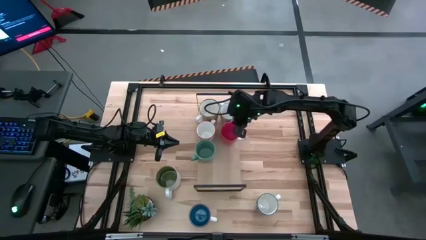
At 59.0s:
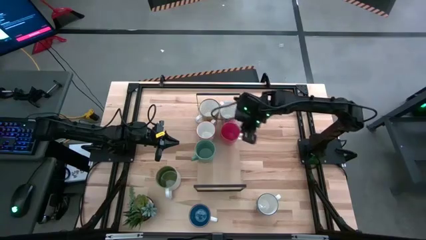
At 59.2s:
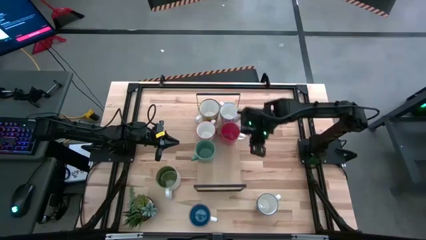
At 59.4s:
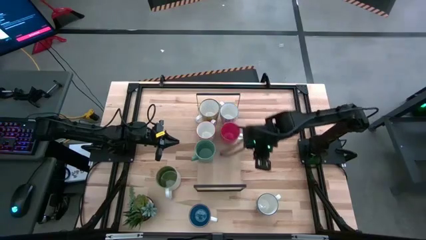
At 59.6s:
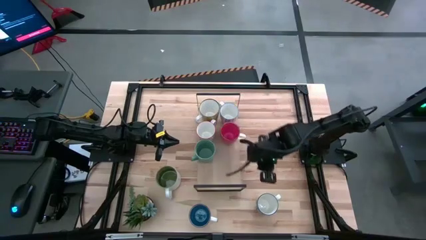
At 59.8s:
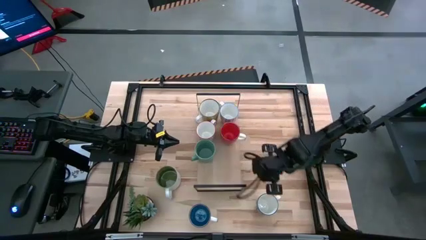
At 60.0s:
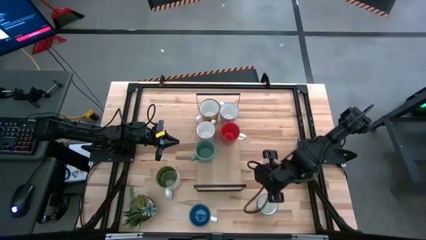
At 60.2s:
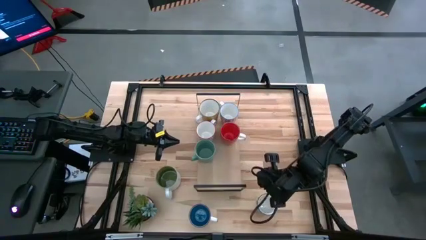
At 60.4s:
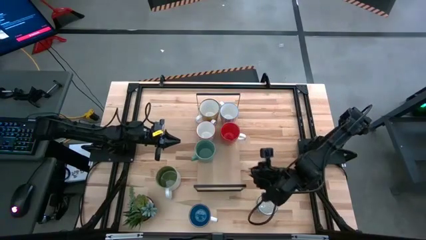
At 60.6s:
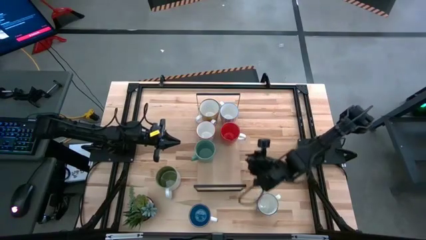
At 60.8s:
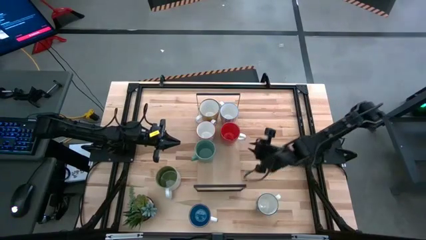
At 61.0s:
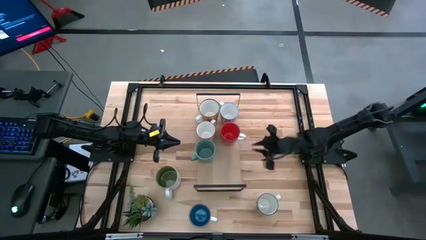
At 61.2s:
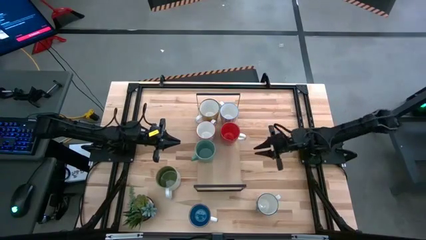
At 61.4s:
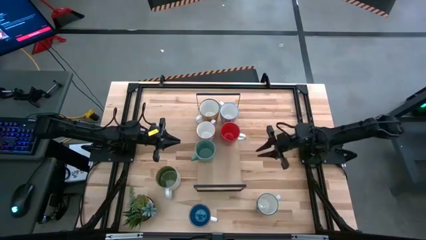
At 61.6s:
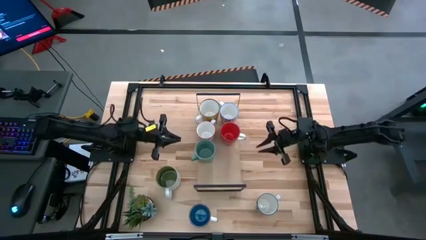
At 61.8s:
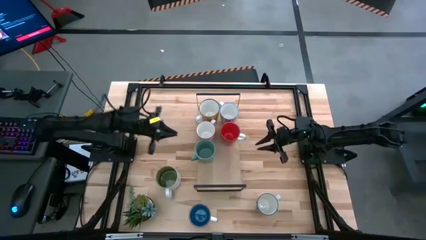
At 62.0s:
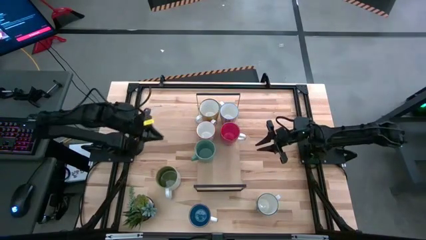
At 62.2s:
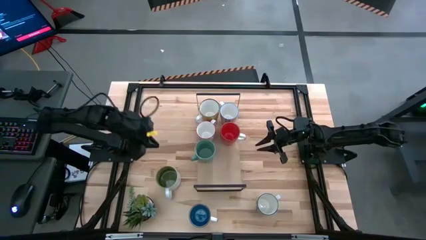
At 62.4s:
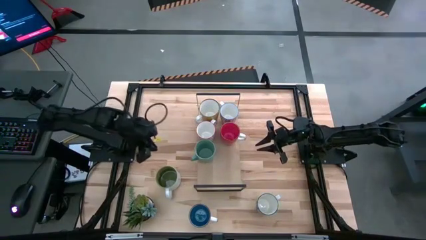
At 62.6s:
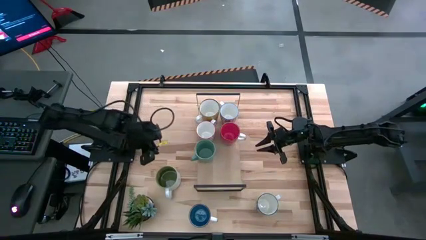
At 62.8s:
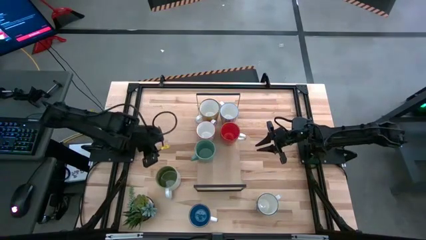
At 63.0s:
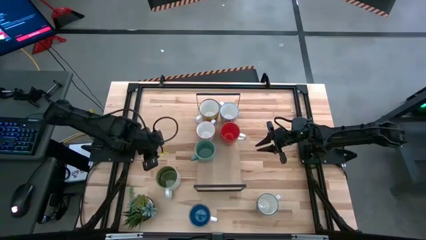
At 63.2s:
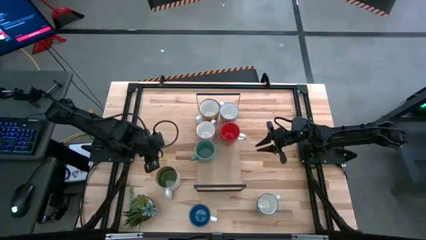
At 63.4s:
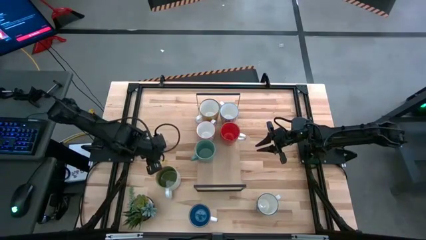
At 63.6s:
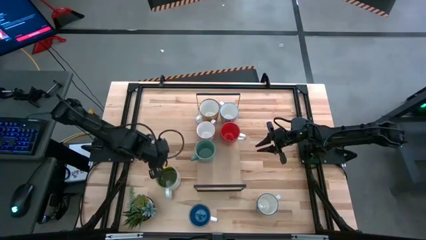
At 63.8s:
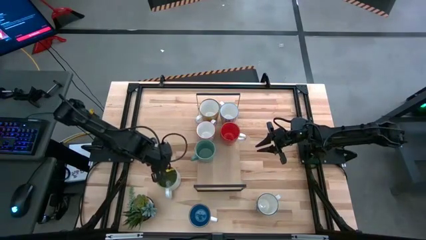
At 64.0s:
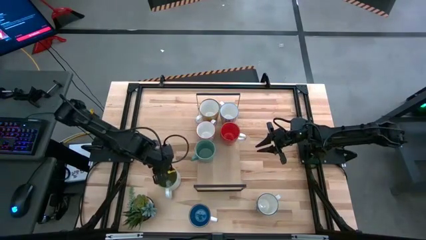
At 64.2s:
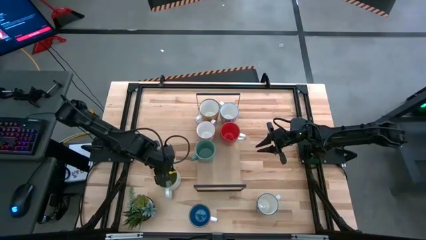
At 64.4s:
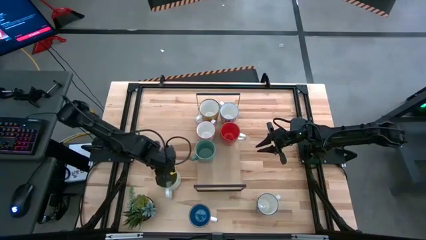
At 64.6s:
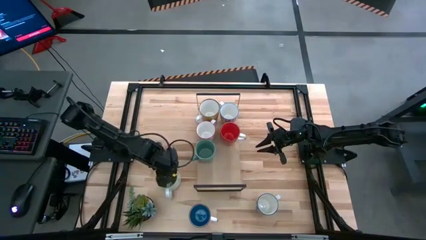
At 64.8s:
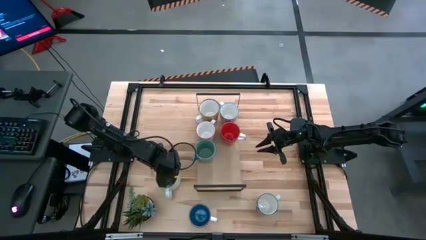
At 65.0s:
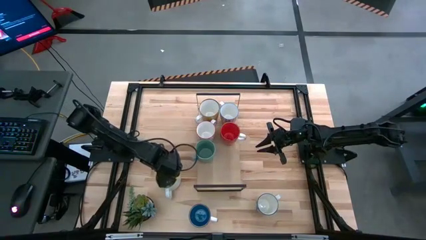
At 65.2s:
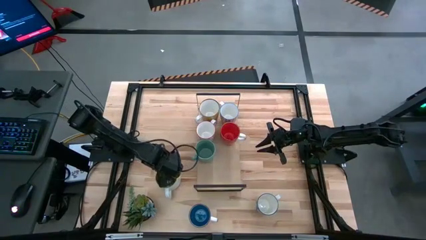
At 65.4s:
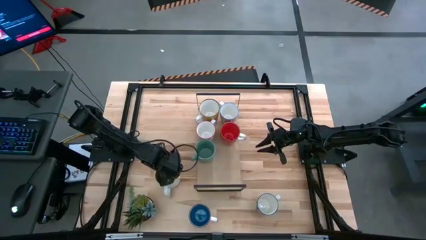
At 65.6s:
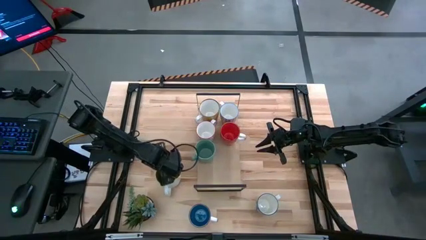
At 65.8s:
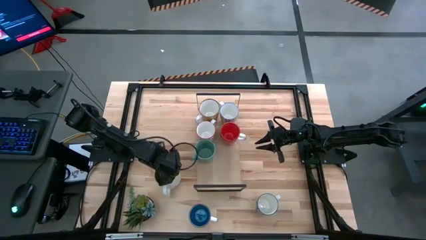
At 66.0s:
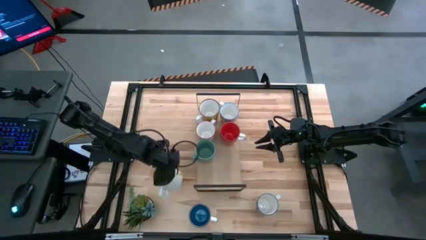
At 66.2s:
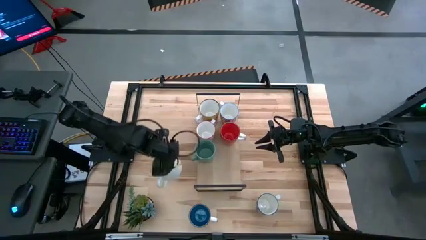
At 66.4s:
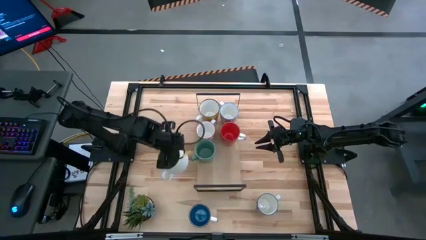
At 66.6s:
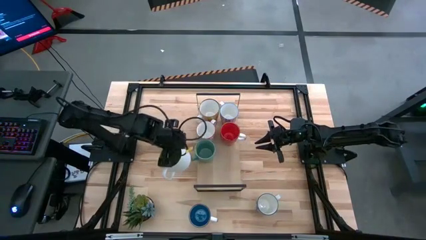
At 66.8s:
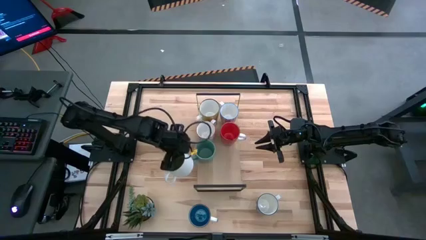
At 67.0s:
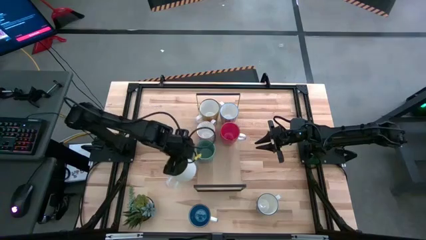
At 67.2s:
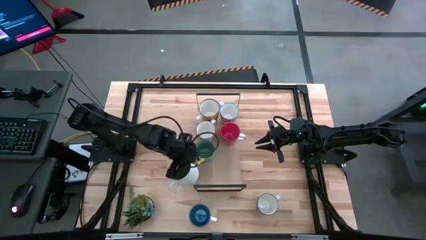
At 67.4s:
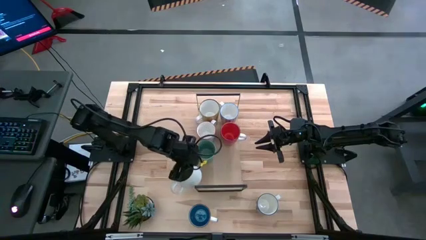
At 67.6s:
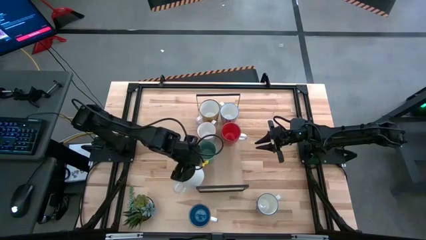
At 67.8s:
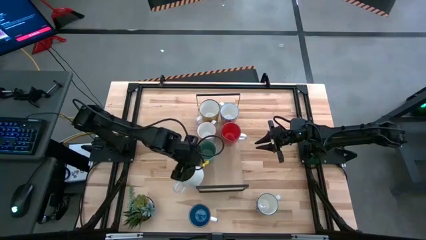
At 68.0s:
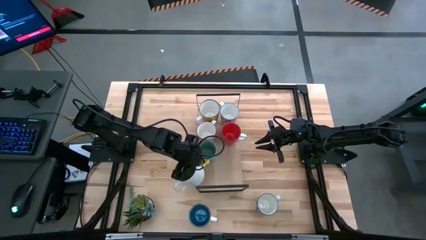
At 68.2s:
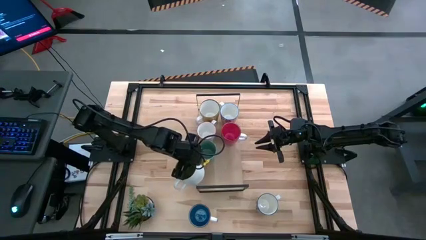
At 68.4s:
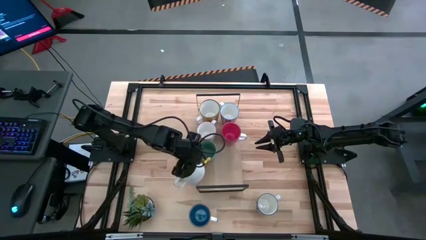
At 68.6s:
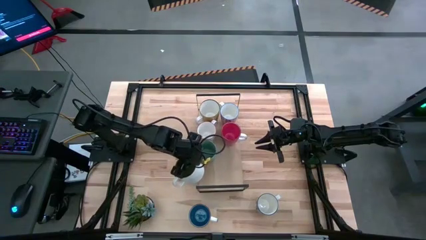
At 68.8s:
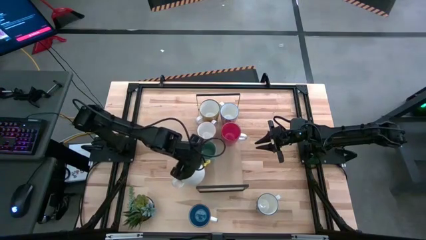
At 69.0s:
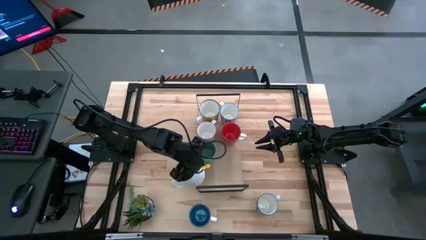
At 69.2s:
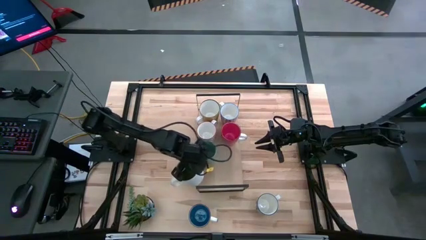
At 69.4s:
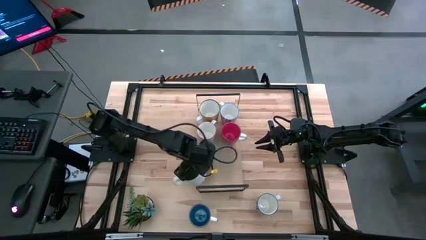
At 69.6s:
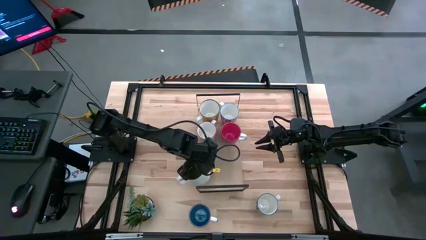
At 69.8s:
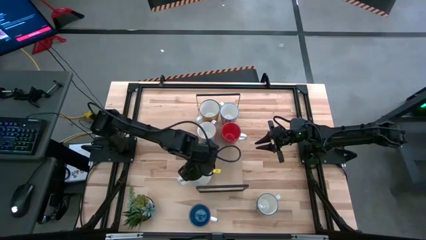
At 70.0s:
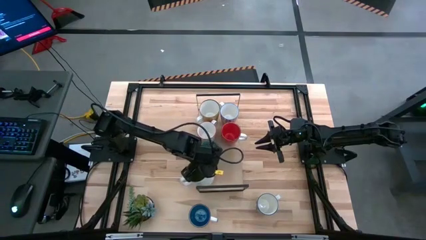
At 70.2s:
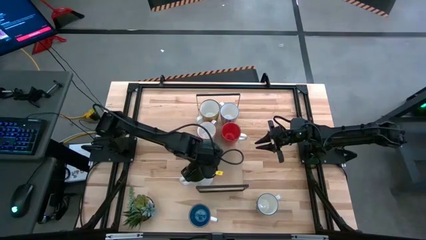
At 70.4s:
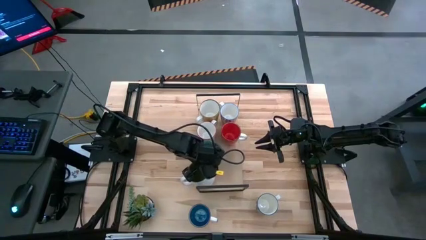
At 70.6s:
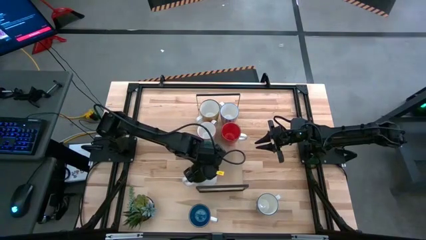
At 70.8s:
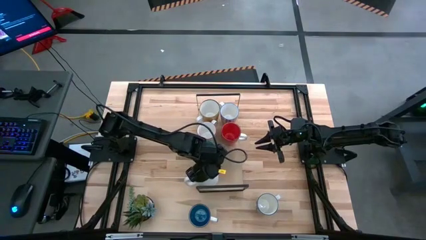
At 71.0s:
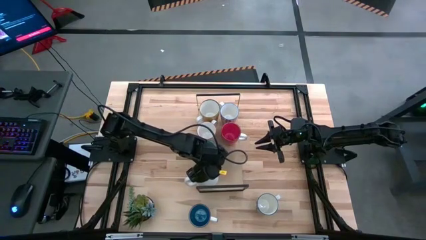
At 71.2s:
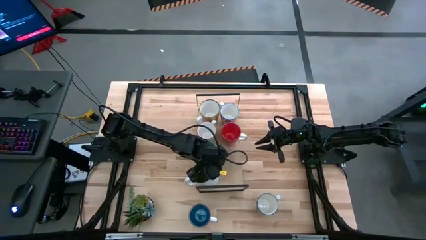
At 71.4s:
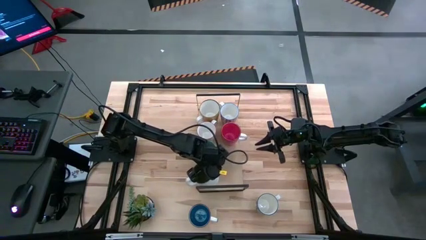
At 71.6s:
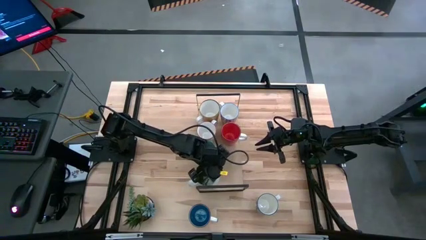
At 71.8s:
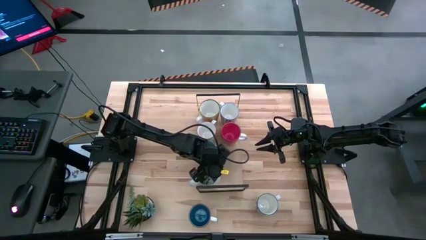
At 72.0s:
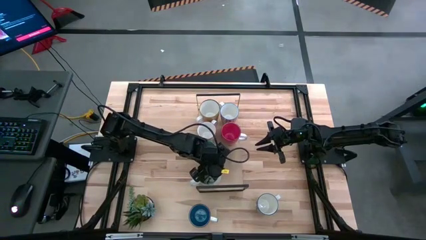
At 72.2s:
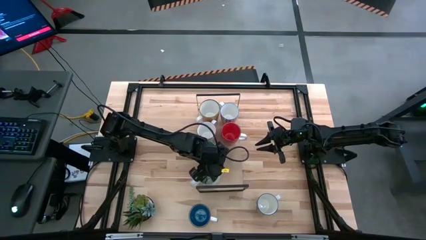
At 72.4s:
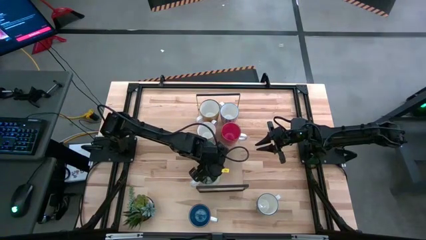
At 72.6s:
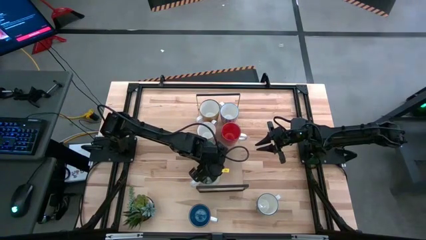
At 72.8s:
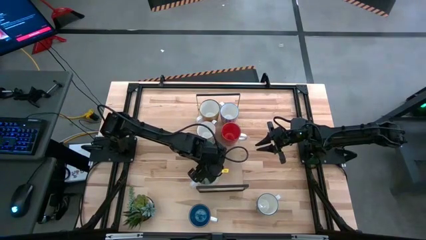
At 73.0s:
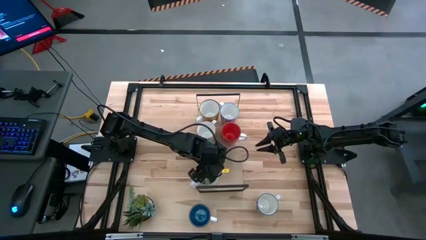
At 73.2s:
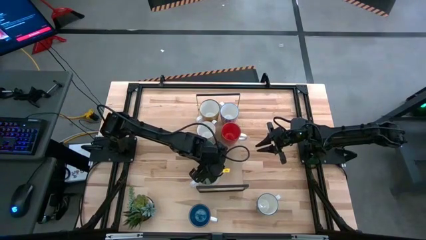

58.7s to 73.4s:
Task: Place coffee mugs
Put the white mug on the shelf

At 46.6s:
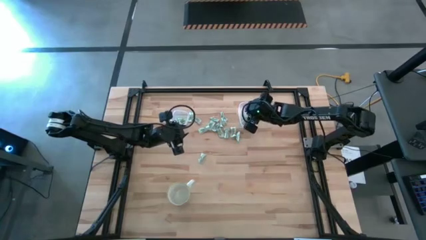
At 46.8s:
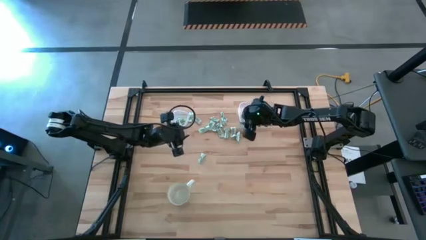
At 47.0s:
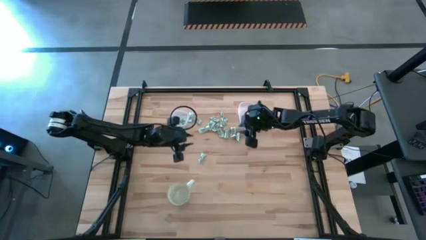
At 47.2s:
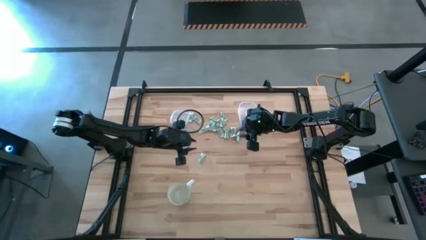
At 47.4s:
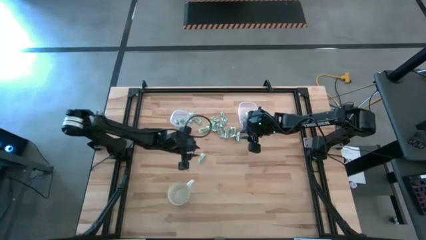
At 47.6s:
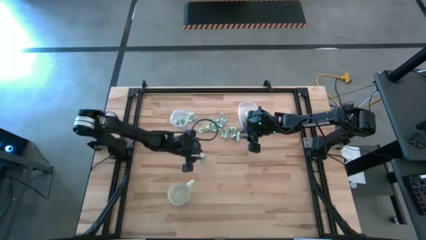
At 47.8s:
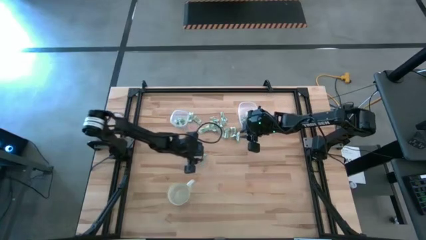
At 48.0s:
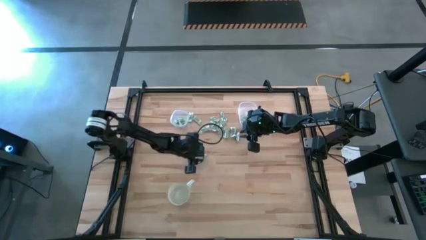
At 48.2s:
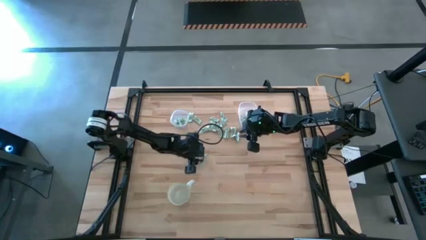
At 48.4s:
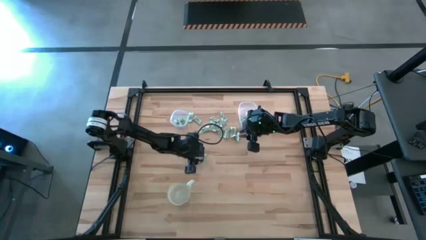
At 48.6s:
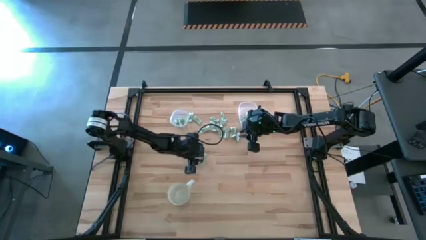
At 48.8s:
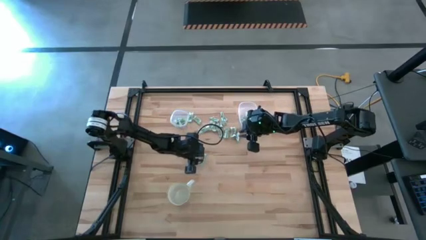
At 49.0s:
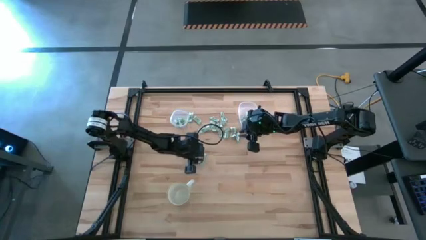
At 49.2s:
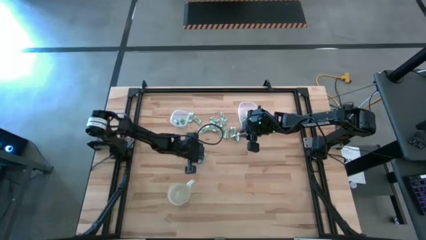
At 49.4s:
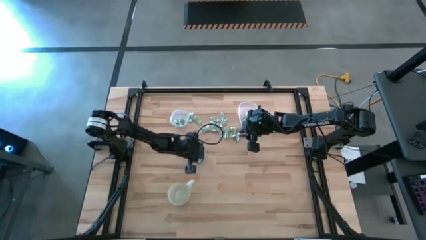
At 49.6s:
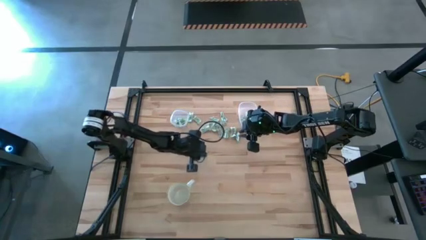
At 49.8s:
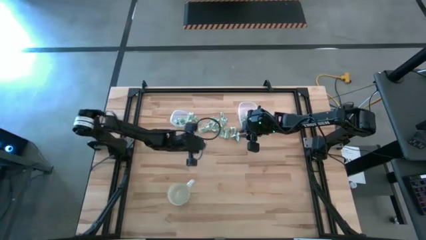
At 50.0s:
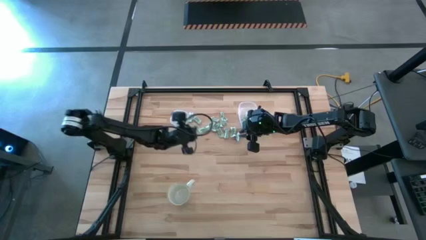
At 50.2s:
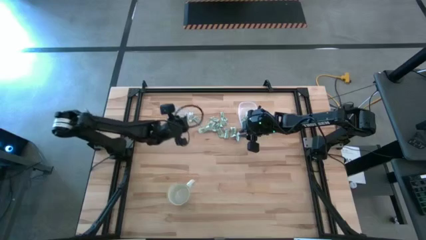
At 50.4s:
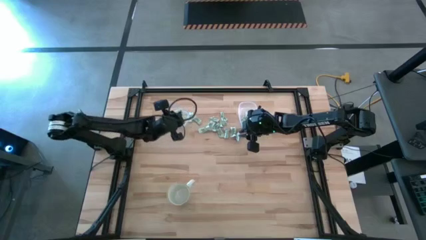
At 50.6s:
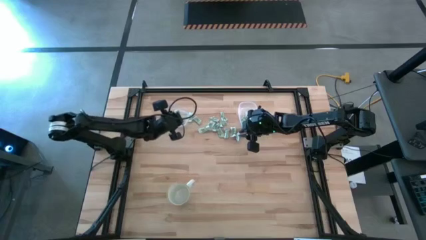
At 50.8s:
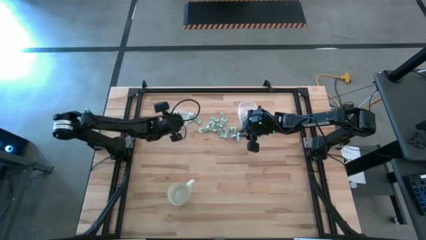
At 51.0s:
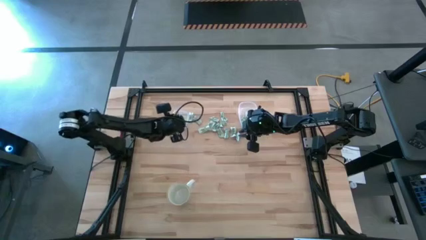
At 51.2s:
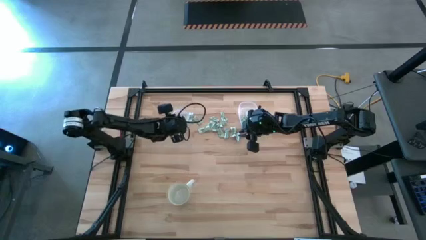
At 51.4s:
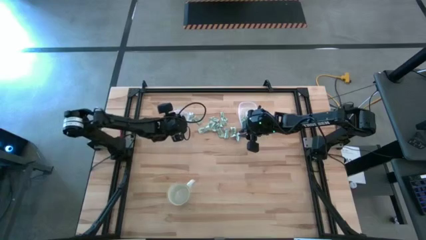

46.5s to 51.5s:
Task: Pick and place items into bin
Put the green stevia packet into the square transparent bin
